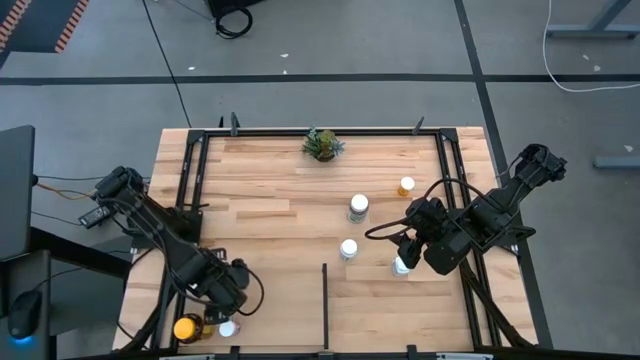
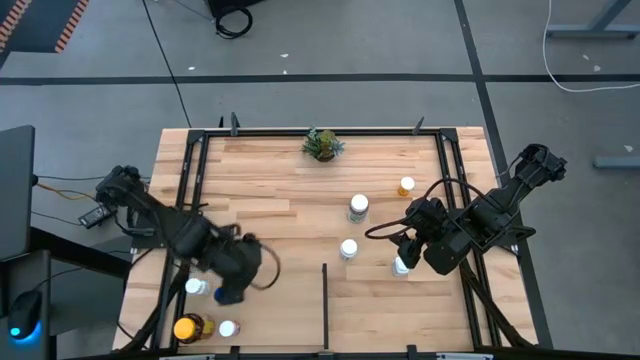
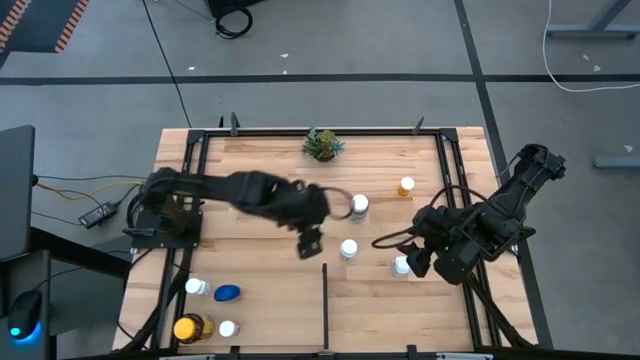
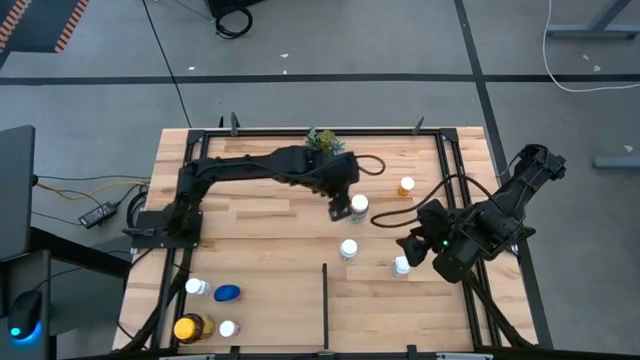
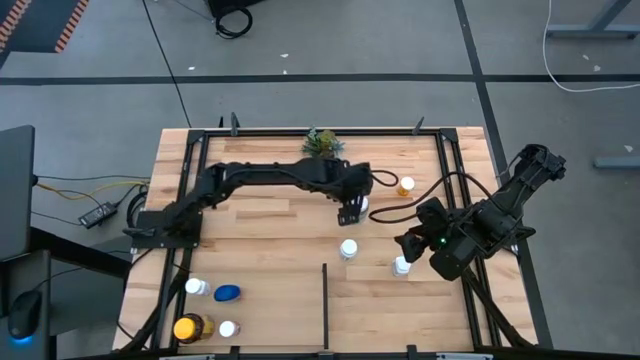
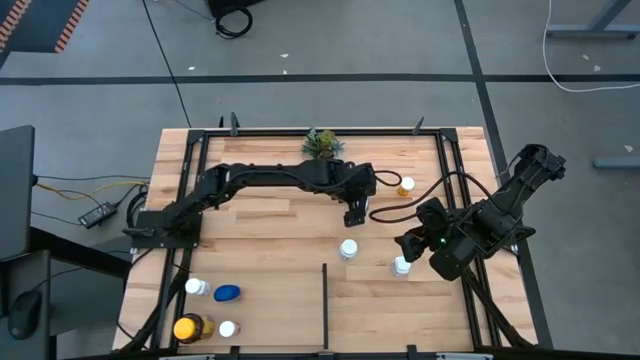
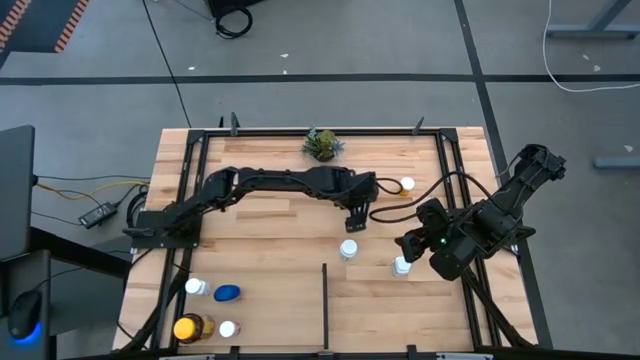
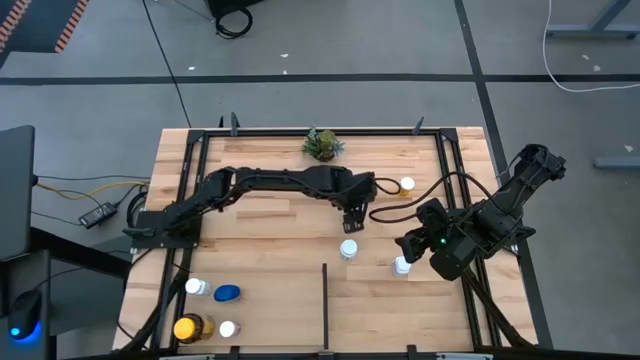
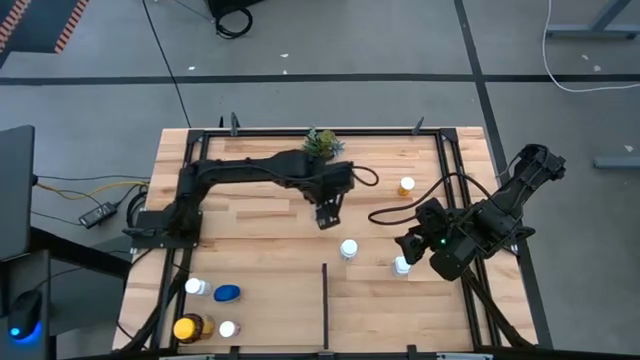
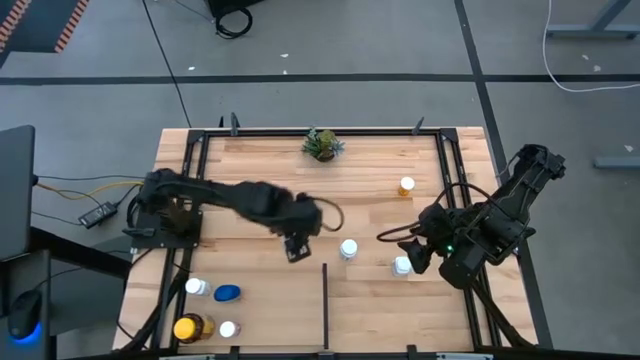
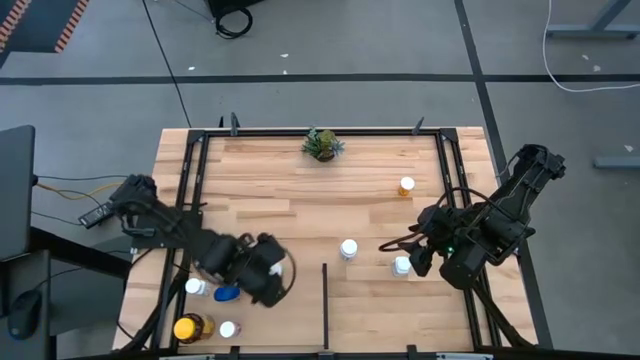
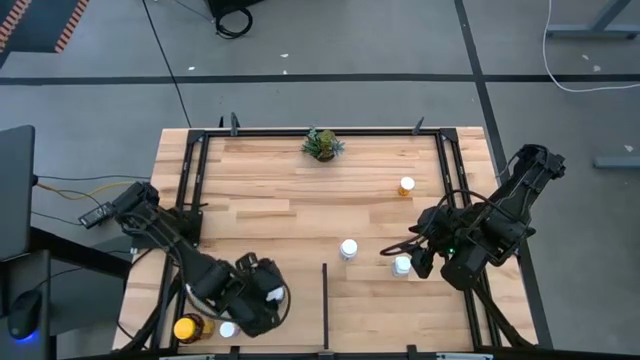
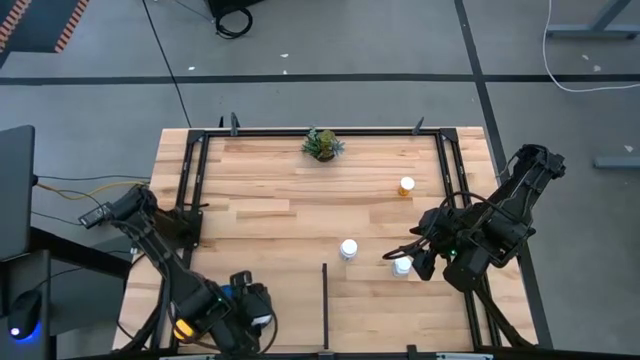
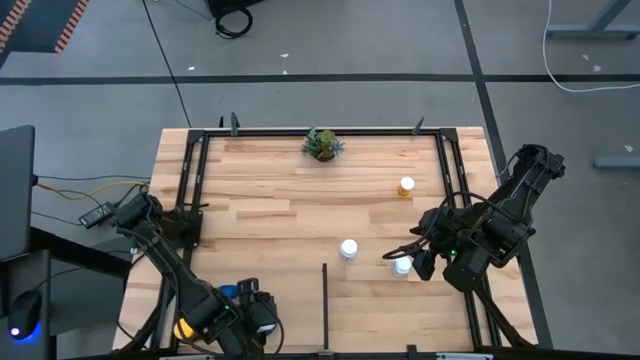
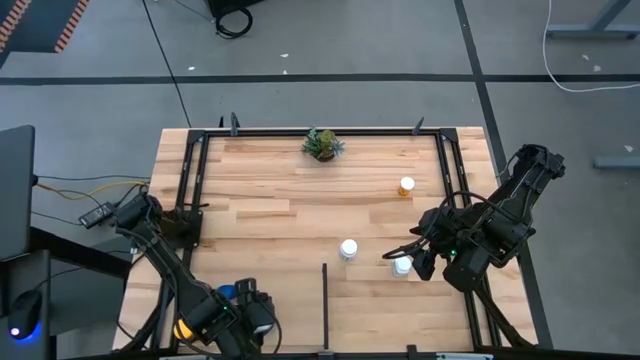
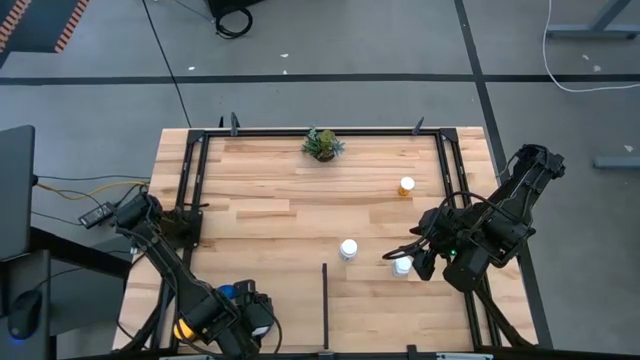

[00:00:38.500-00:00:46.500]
Task: Pick and place medicine bottles onto shelf by color
Put the white and green medicine bottle on the shelf

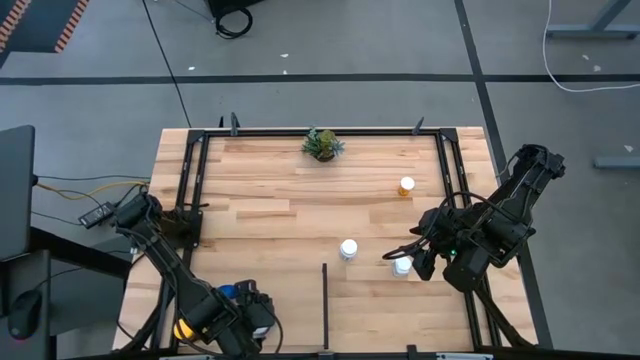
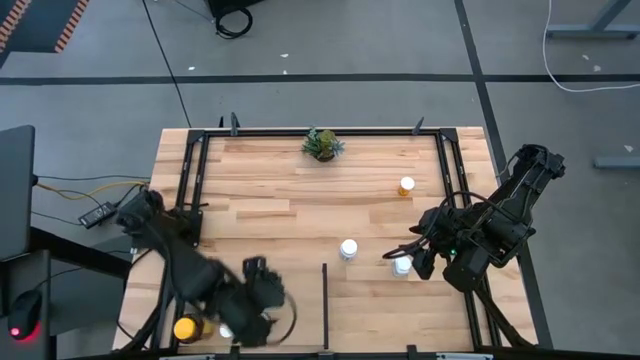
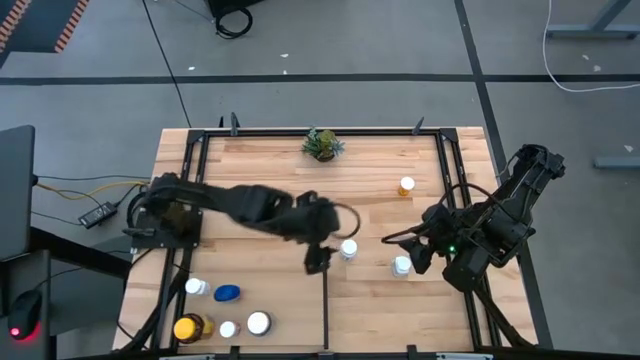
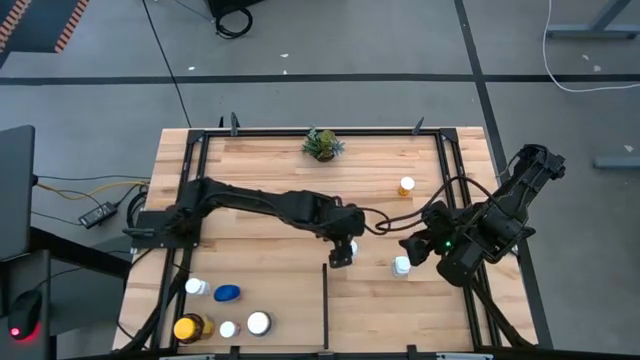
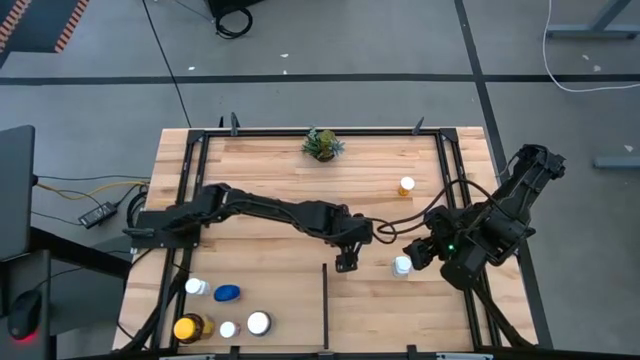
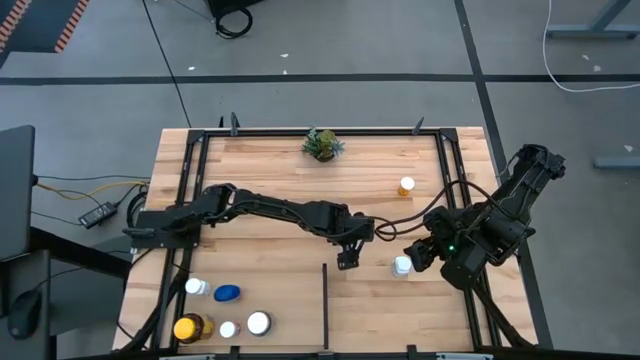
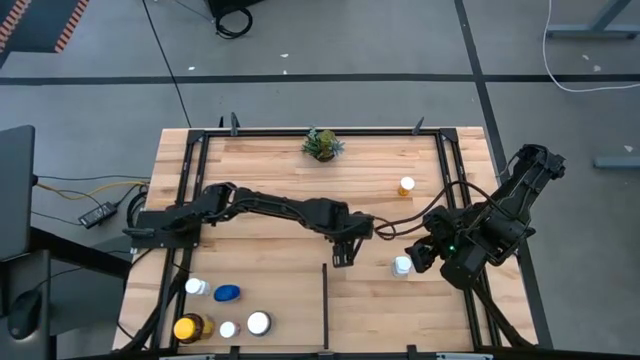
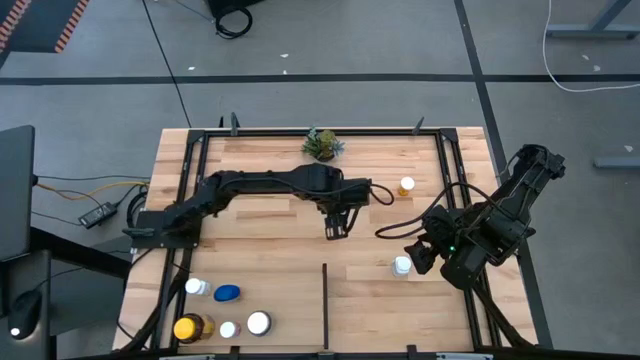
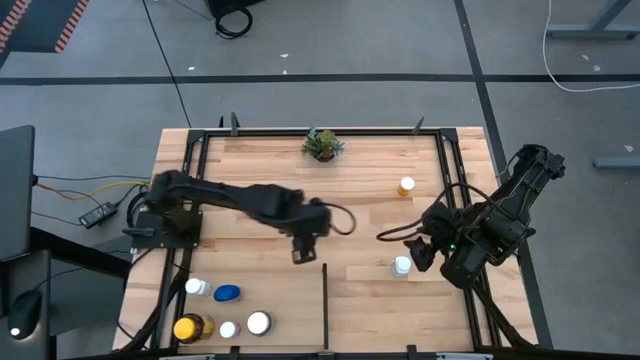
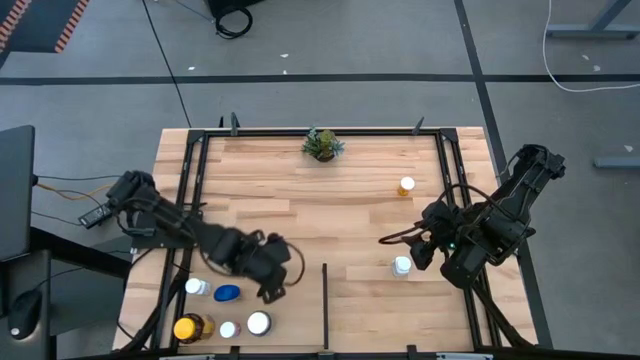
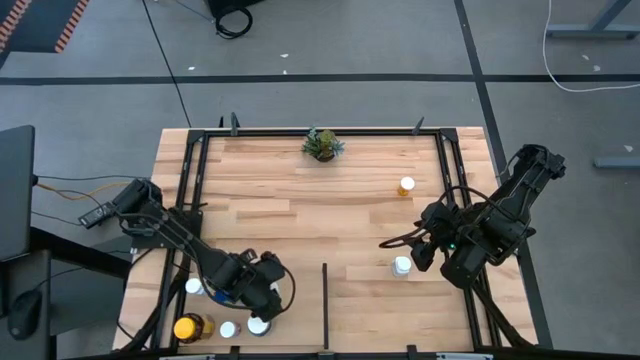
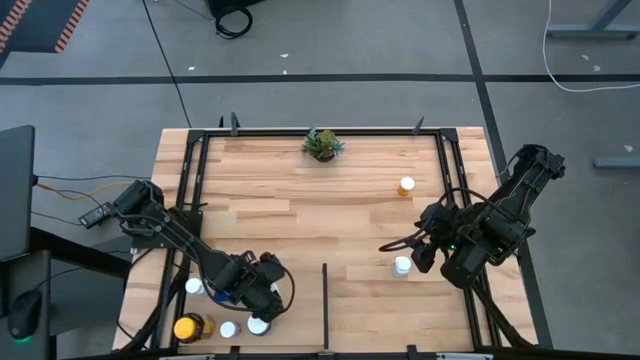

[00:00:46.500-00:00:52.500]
Put the white medicine bottle on the shelf

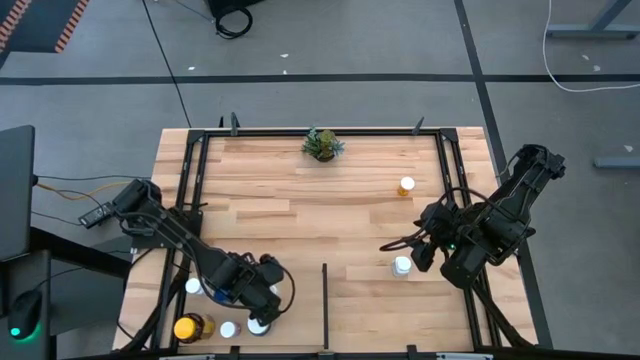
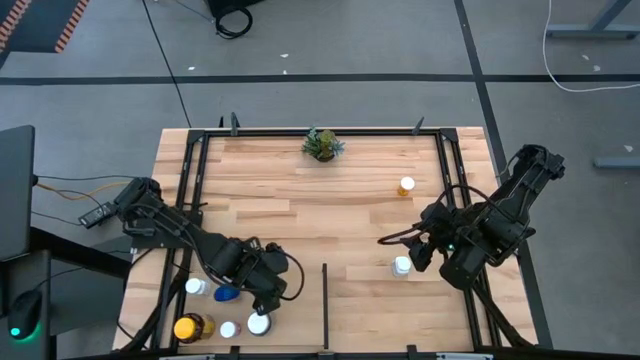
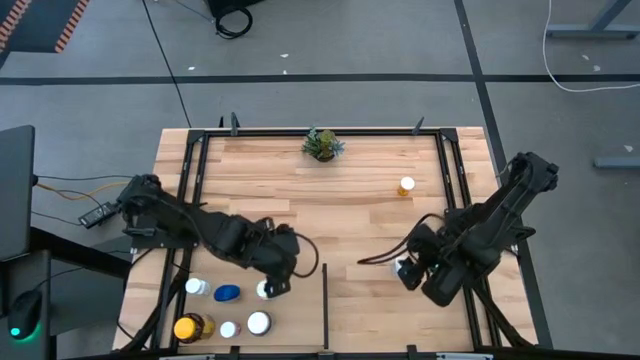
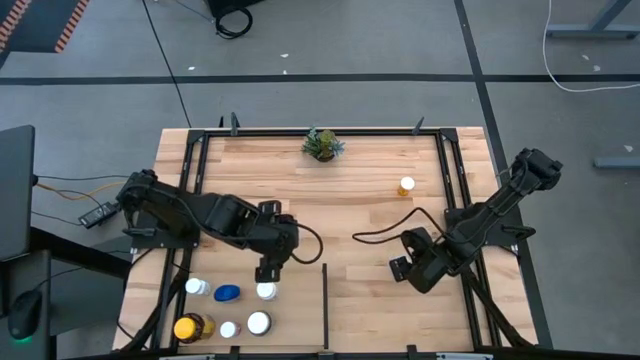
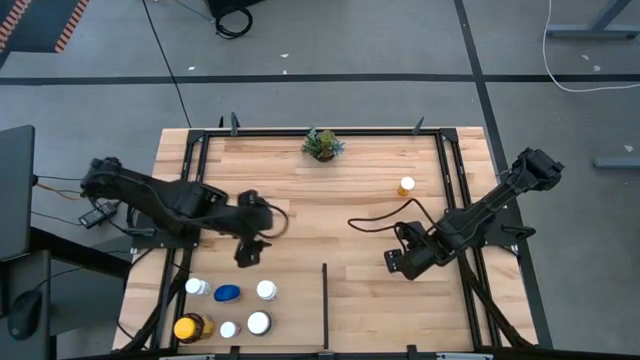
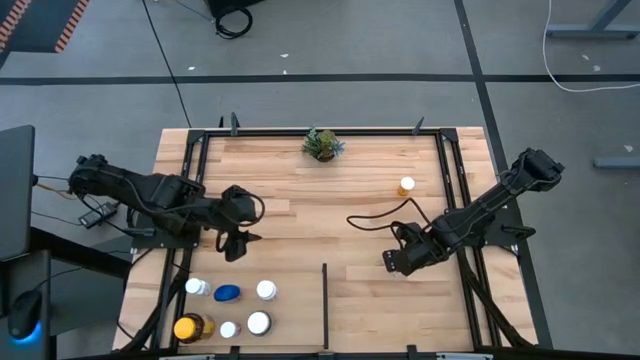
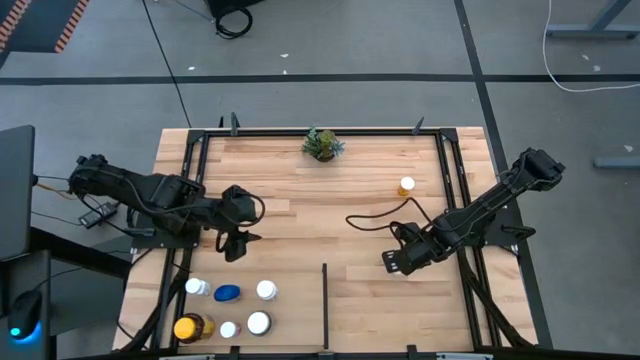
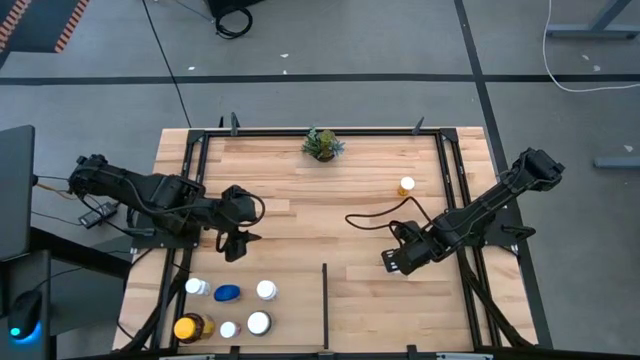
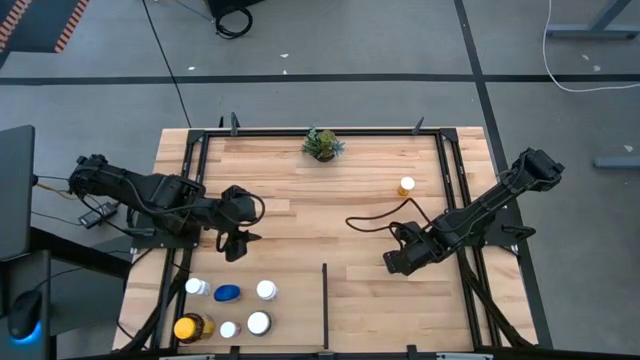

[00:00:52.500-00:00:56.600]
Put the white and blue medicine bottle on the shelf

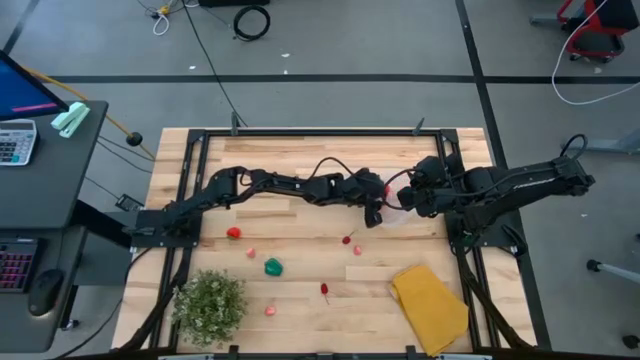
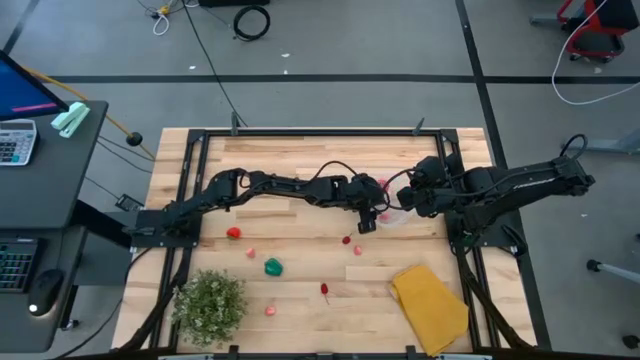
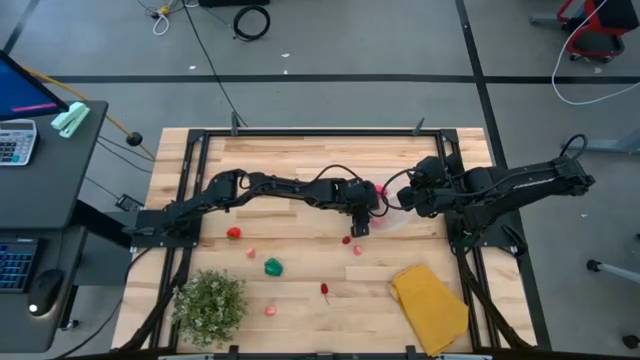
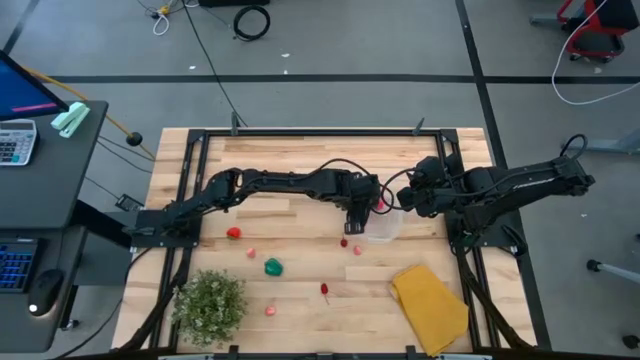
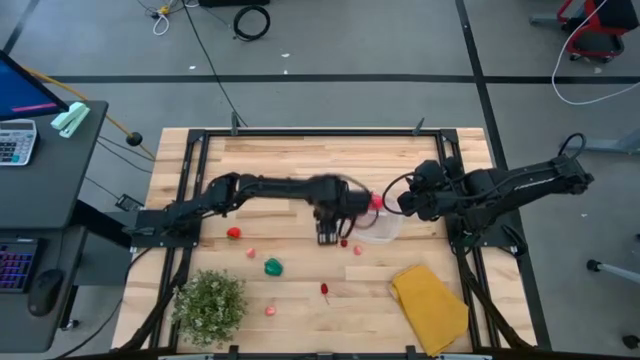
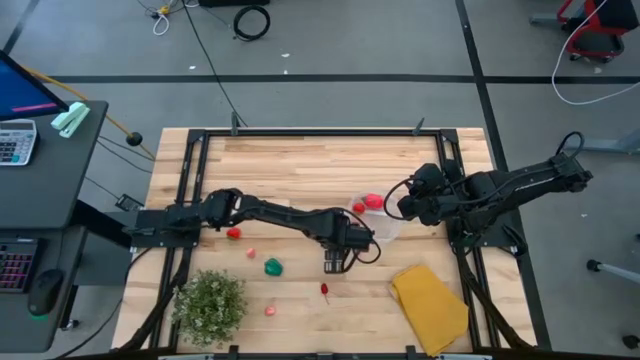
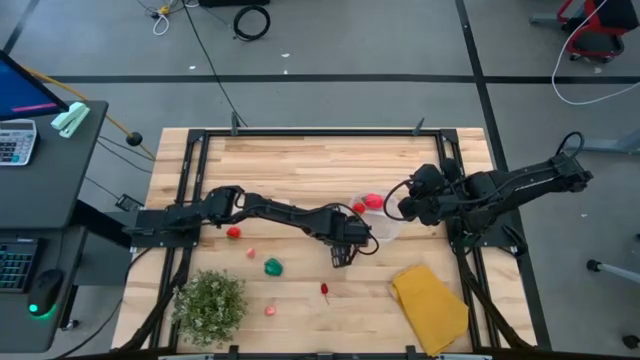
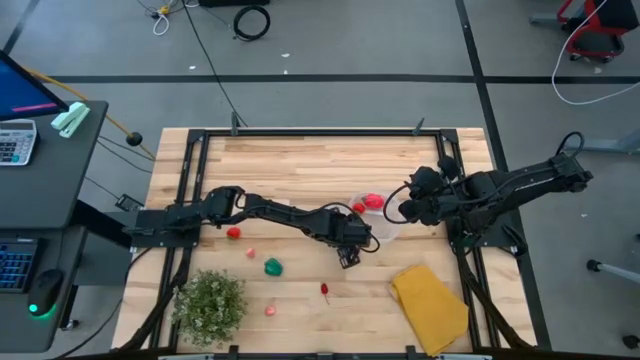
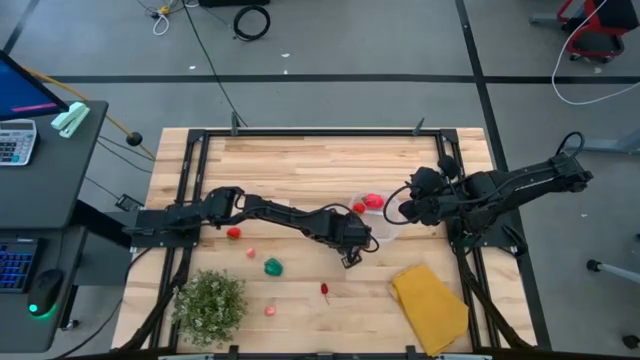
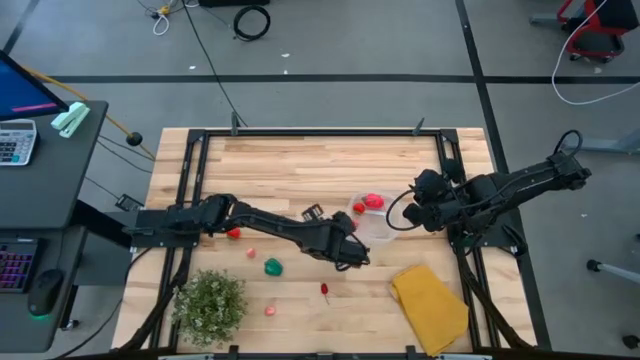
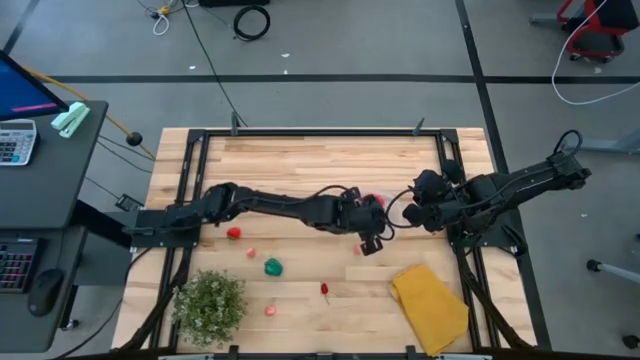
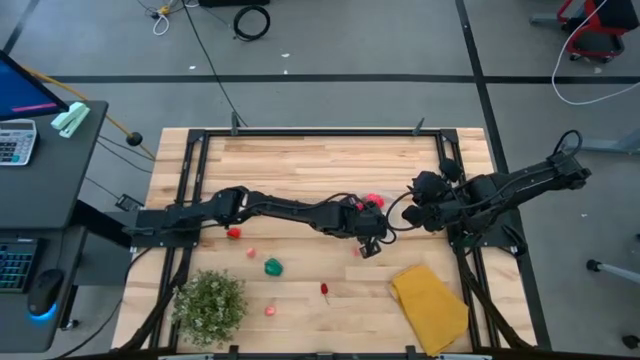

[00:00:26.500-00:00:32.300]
Task: Pick and placing Produce into tupperware
Put the red cherry into the transparent container
